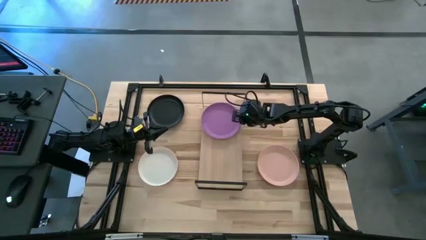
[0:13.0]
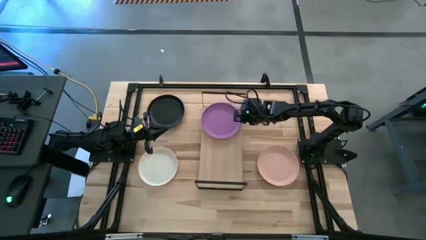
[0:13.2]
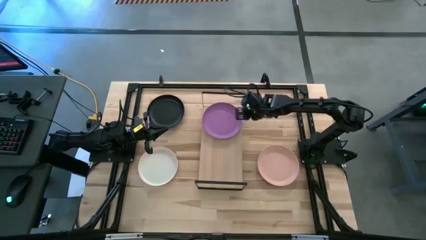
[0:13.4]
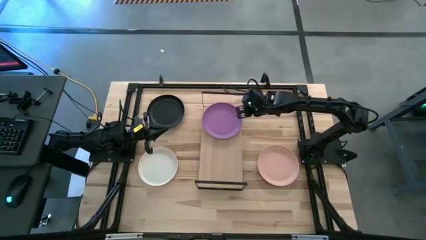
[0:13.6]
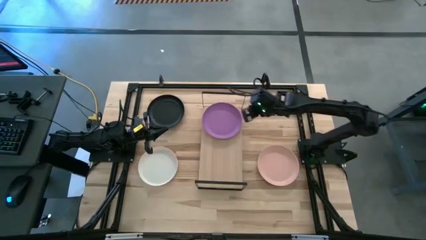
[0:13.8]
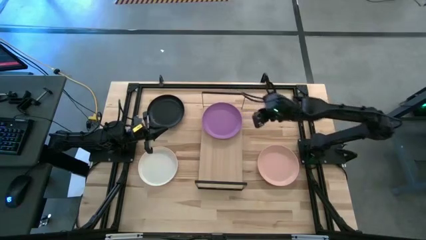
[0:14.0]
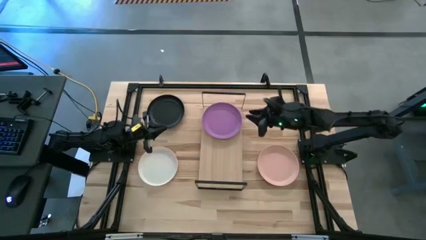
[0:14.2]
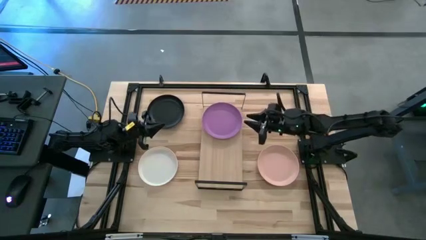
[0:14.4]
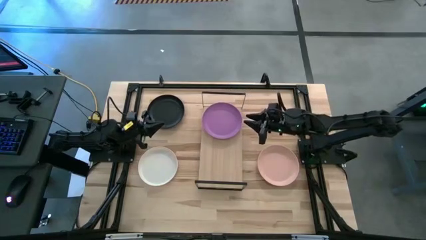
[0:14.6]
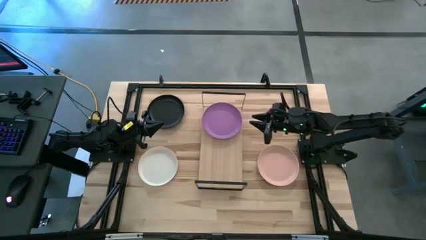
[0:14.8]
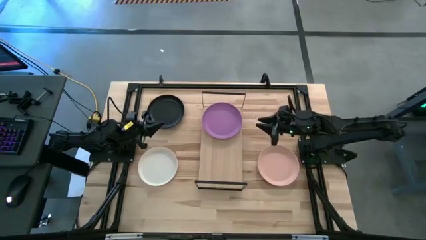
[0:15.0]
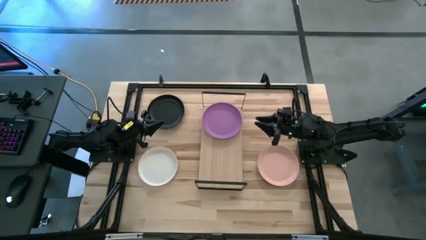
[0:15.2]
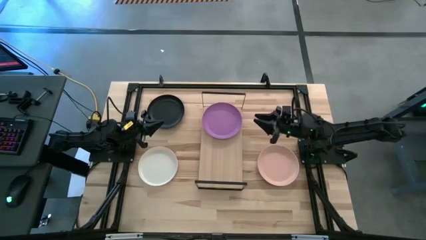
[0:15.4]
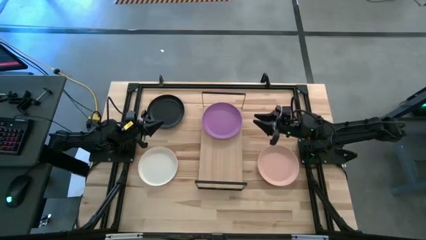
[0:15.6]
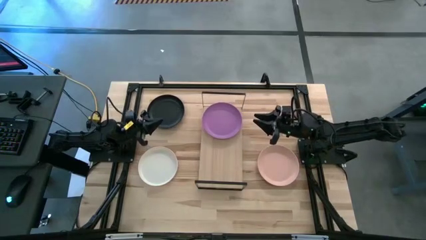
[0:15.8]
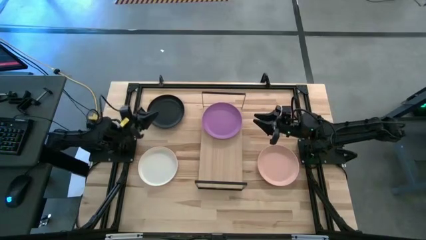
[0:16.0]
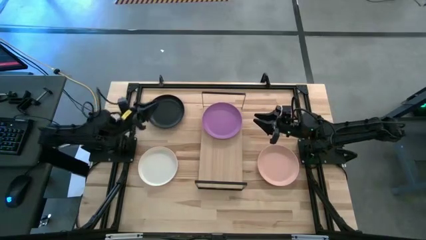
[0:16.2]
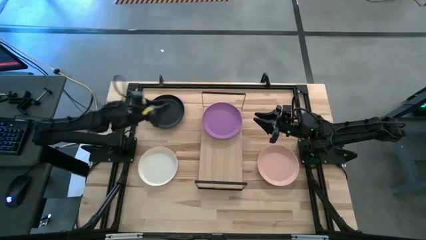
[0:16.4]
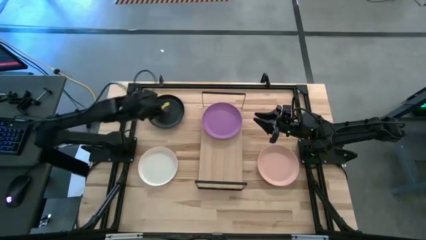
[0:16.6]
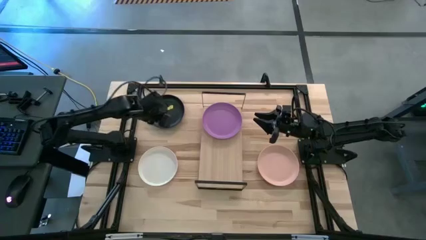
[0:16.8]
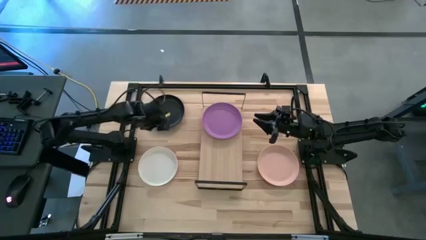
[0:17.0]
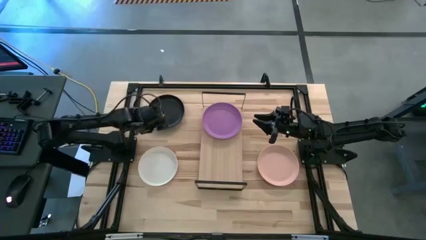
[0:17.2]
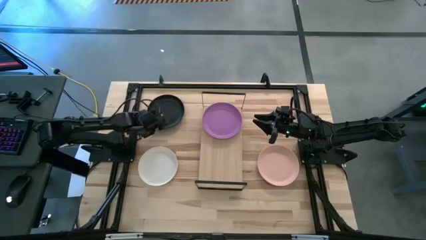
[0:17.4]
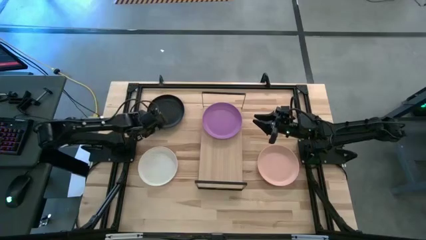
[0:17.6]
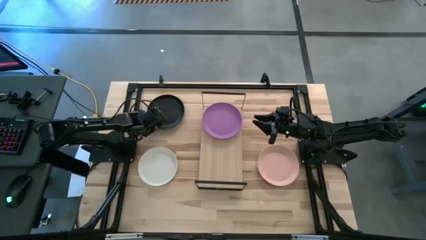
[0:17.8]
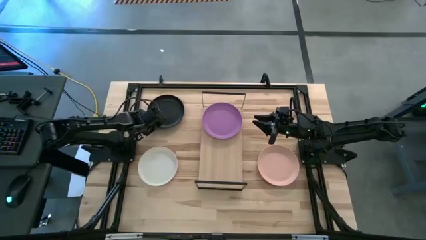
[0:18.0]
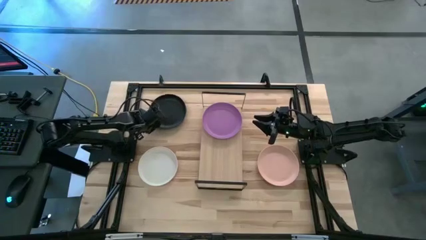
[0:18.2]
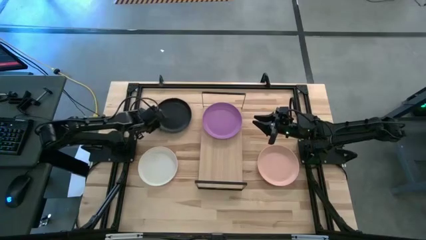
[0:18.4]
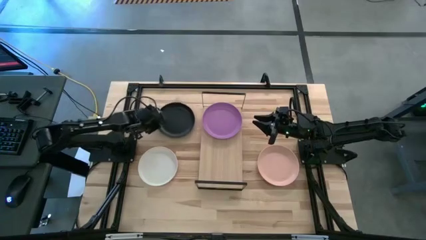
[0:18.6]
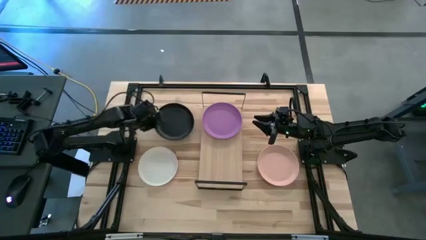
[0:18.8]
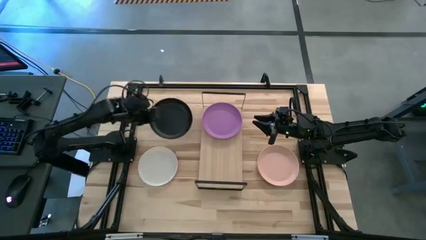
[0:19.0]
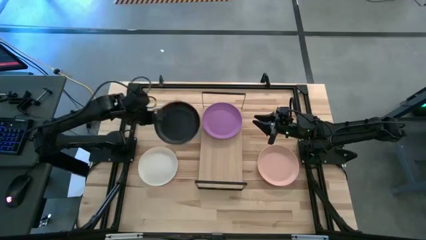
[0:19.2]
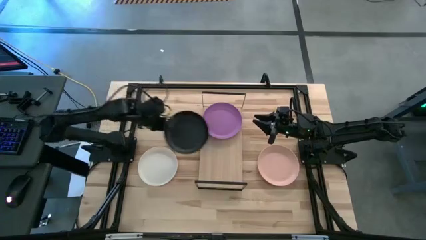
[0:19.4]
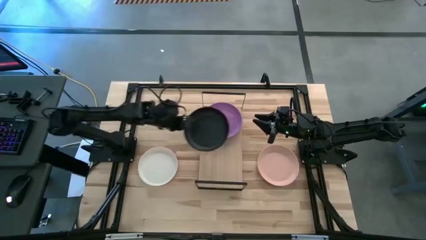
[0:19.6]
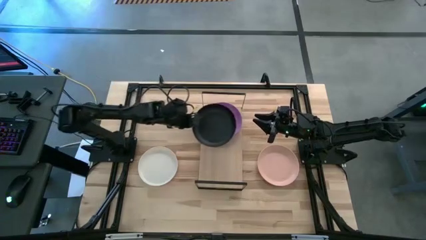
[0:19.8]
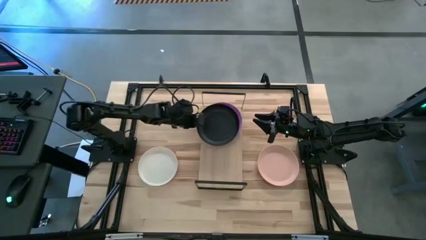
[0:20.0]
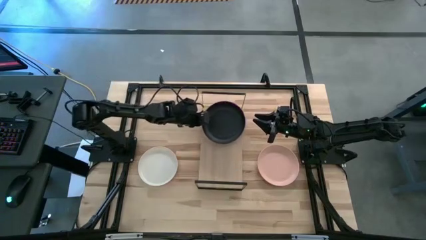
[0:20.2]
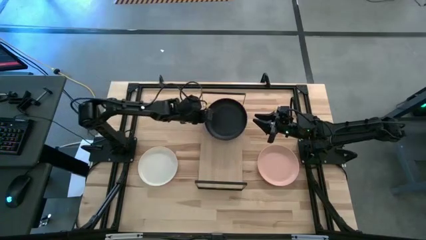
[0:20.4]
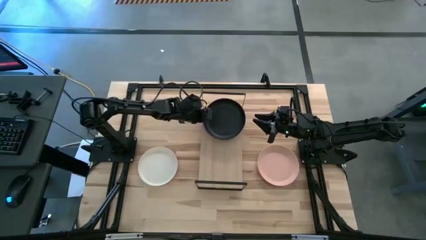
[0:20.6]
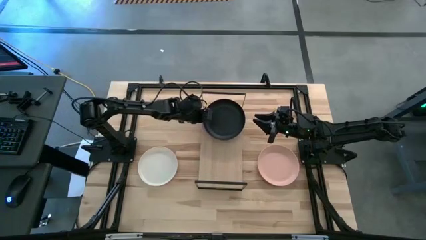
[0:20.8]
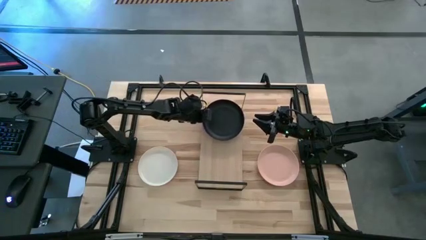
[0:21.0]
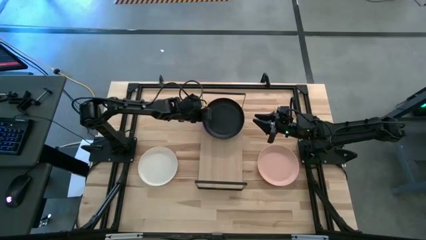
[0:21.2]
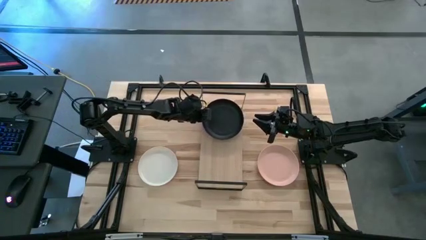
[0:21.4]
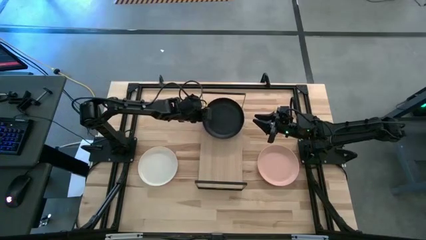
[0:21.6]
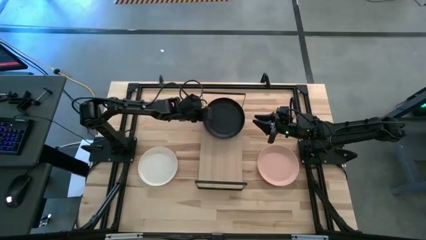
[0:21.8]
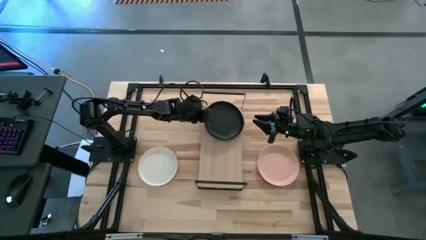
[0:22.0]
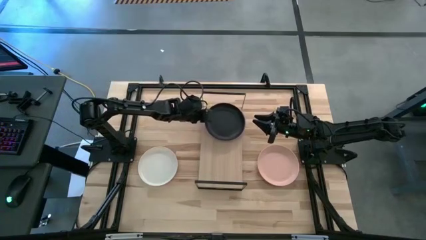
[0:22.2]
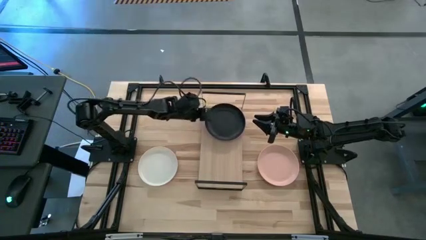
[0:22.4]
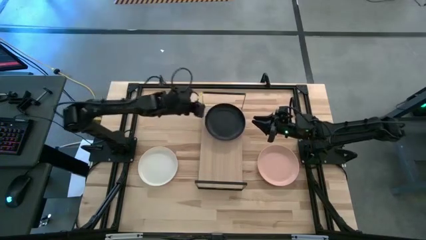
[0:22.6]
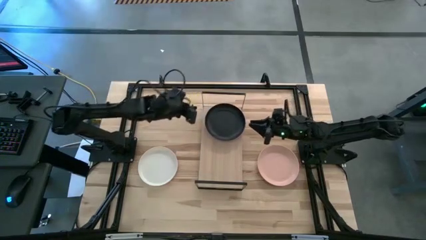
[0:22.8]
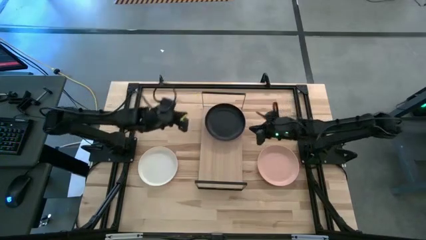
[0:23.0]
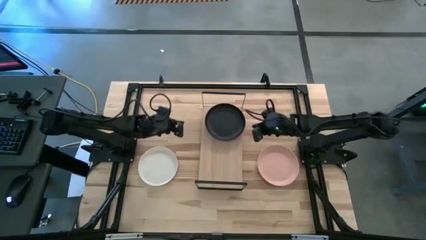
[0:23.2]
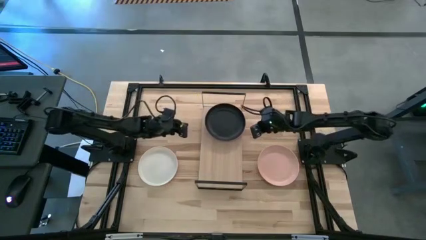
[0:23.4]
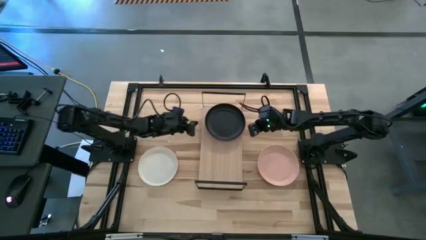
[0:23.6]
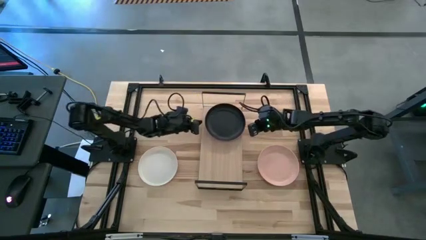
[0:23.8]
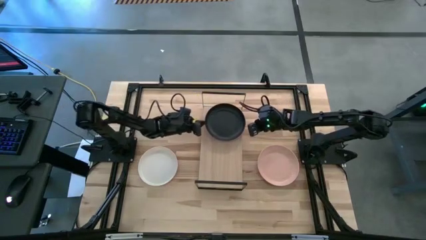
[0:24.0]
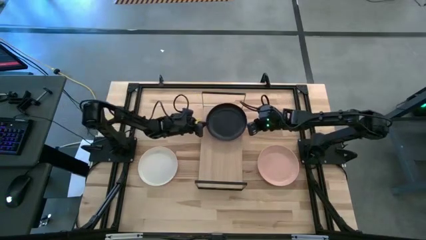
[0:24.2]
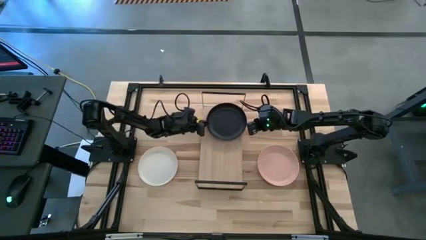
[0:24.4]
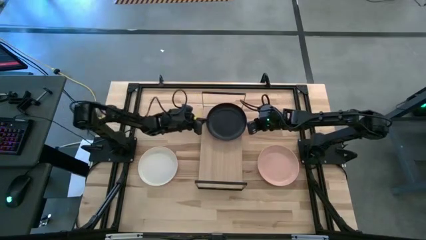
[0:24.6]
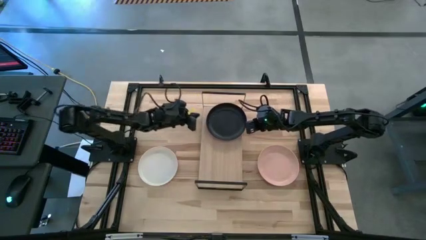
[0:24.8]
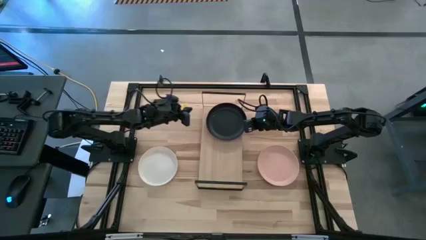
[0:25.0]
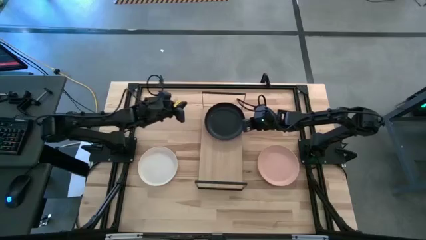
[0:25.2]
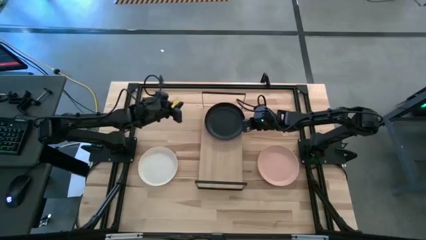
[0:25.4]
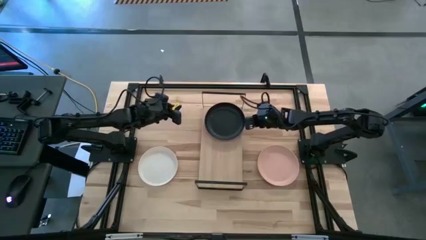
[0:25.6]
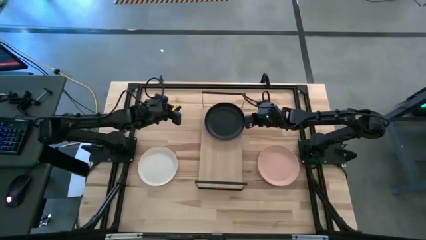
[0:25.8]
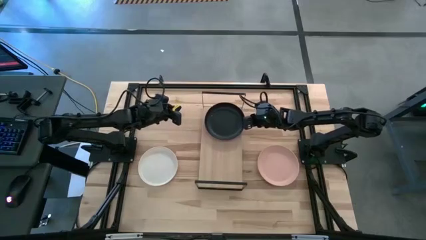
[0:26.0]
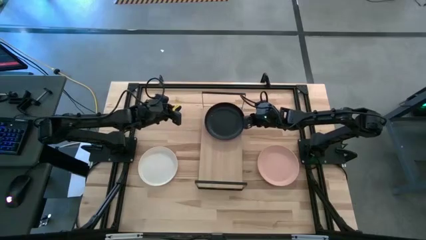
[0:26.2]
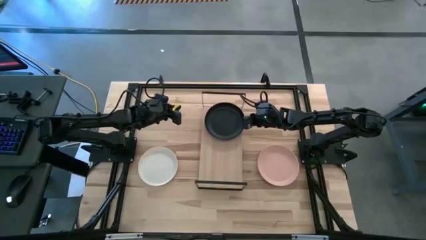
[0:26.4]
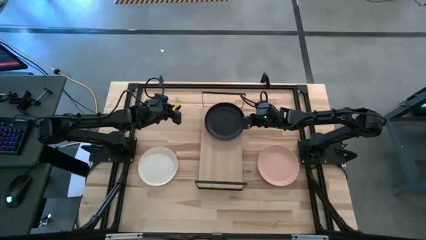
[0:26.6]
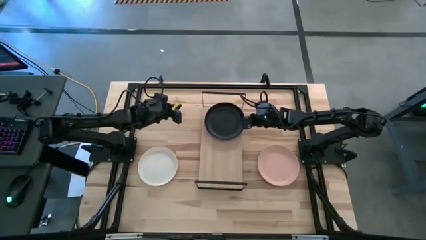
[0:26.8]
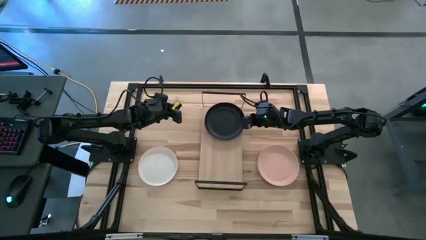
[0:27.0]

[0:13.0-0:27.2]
Task: Place and stack plates onto a shelf
Stack the black plate on top of the violet plate on the shelf
